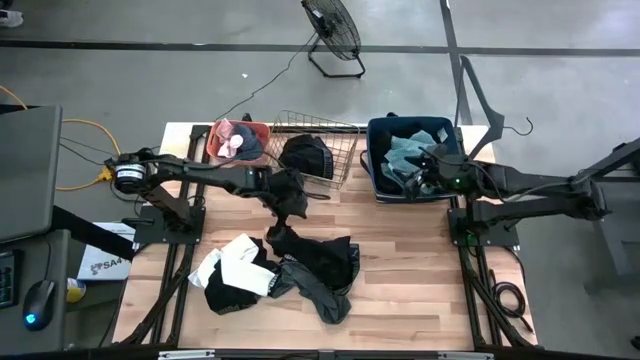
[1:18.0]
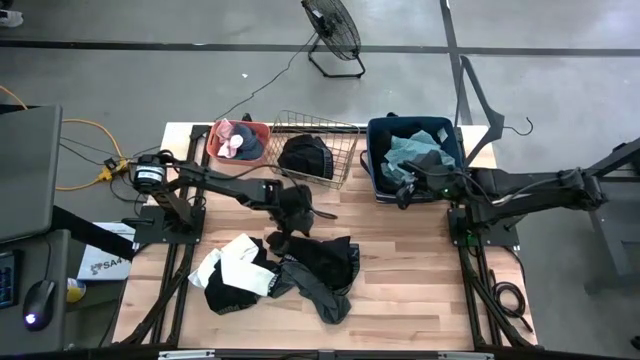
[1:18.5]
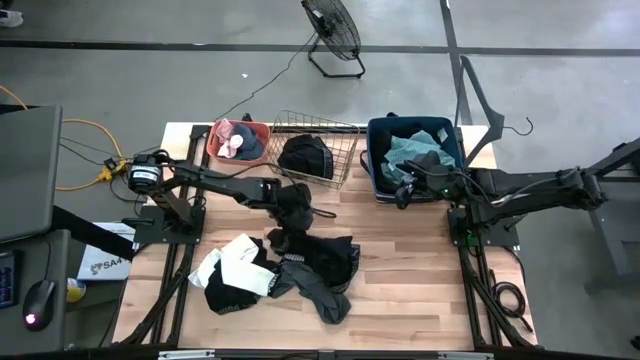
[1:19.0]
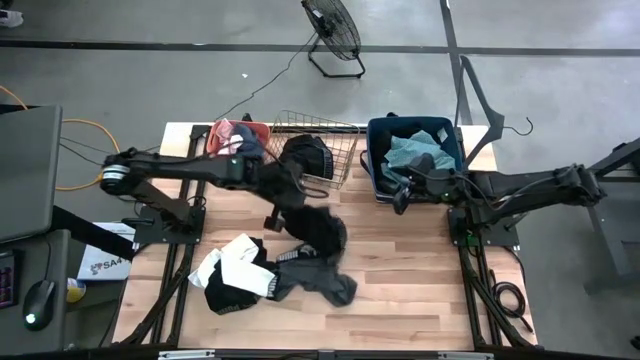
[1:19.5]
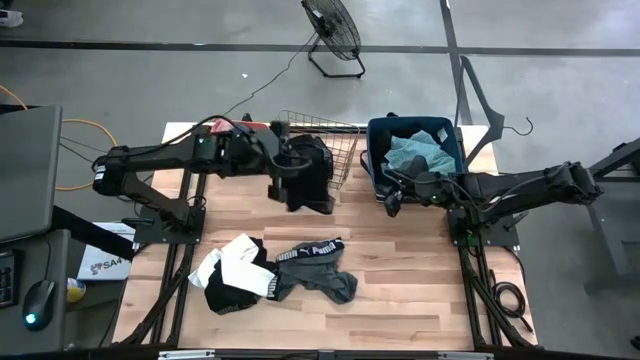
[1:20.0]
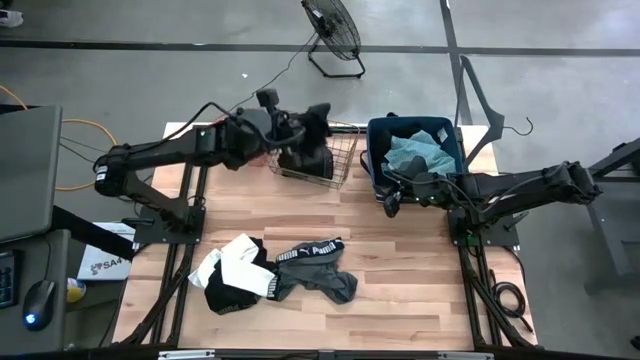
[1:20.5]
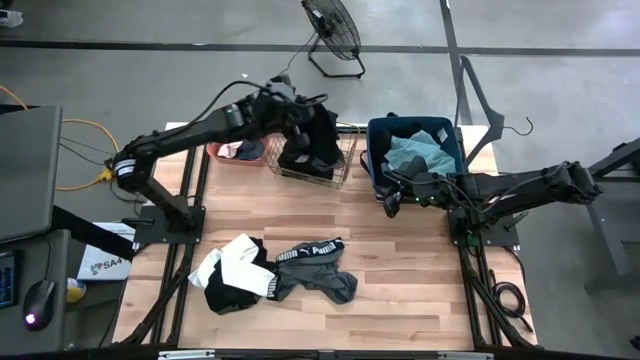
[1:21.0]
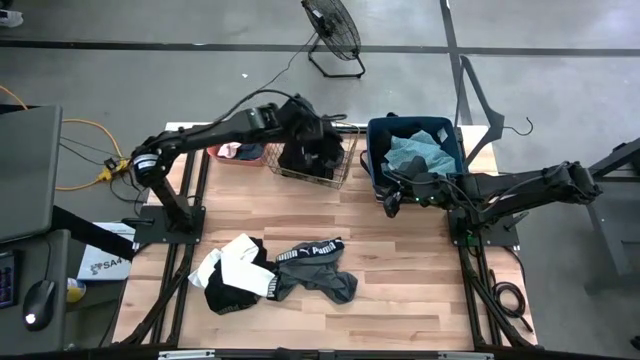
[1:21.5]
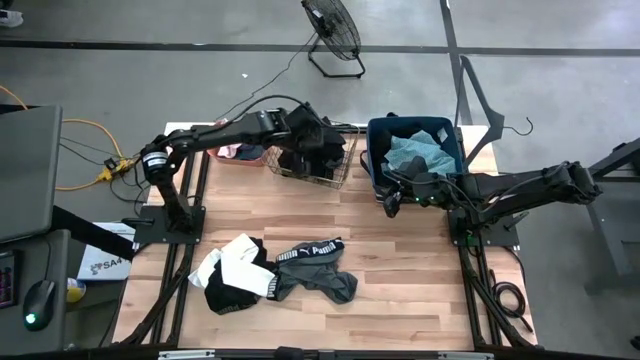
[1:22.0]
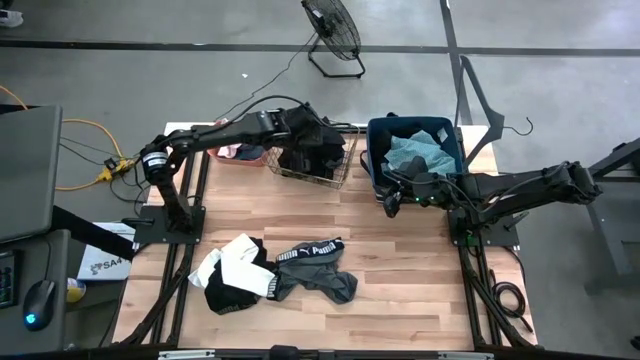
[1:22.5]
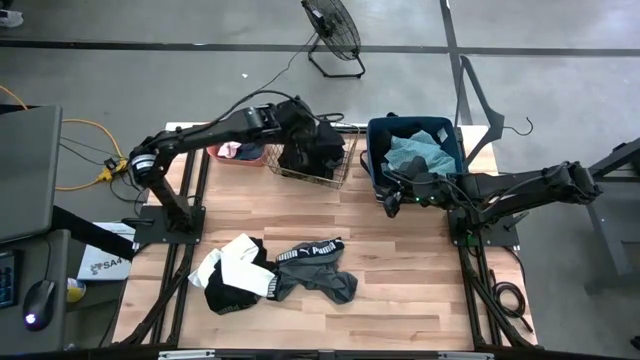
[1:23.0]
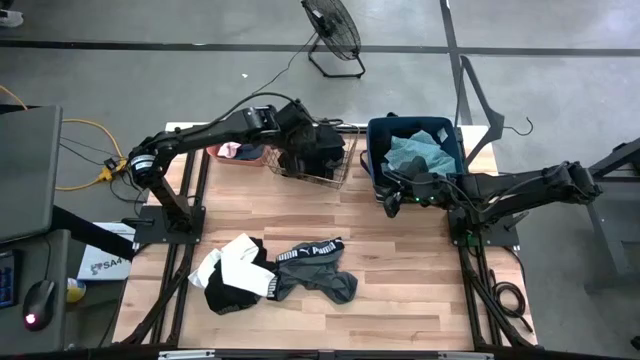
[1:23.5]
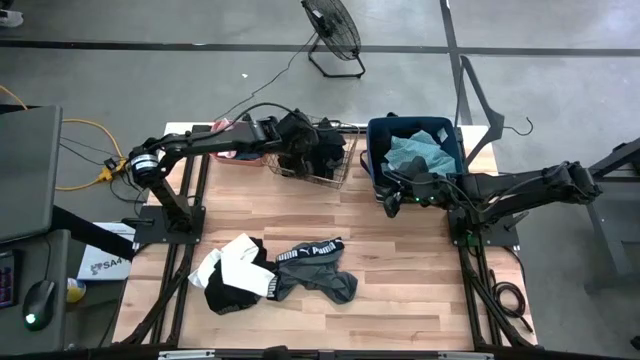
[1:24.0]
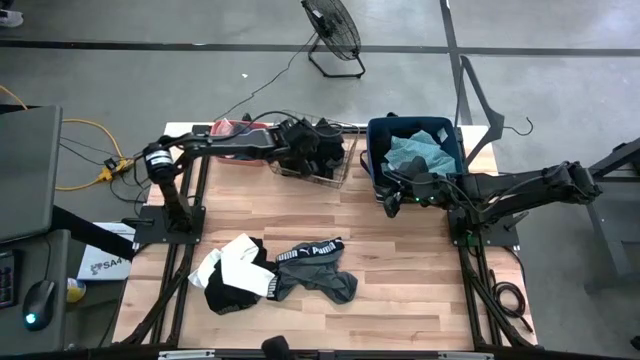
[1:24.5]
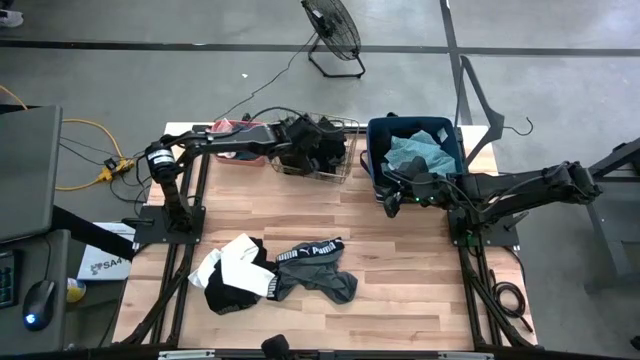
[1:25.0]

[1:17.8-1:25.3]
Task: Pick & Place Cloths
Put the right black boxer into the gold wire basket

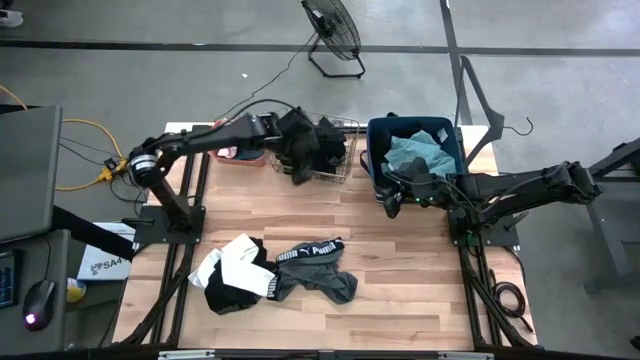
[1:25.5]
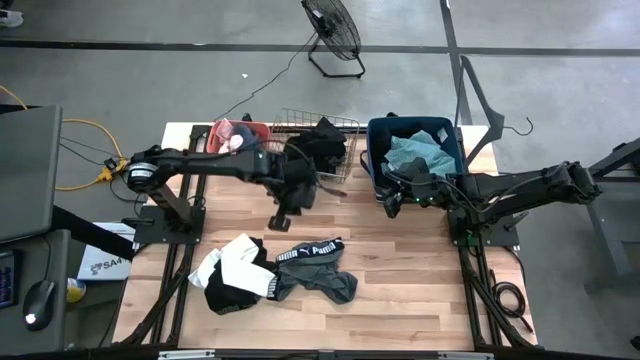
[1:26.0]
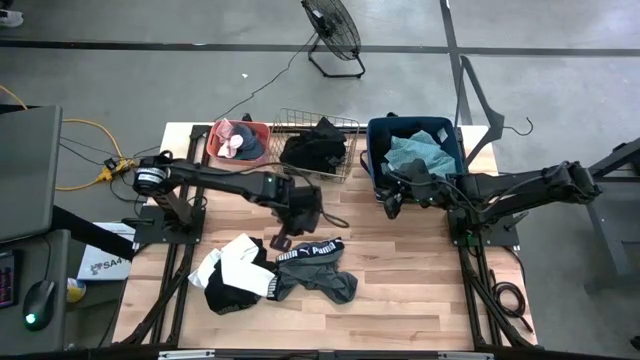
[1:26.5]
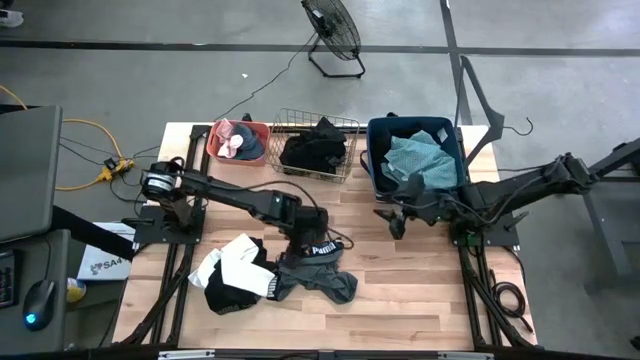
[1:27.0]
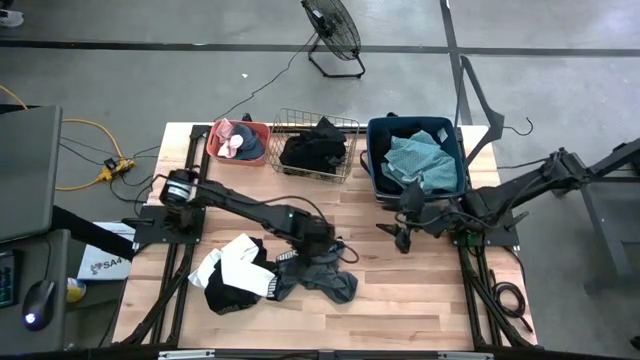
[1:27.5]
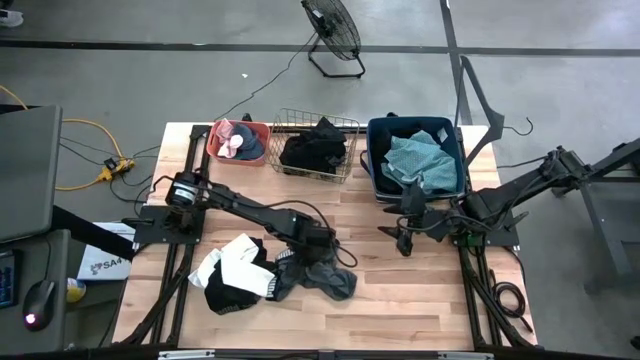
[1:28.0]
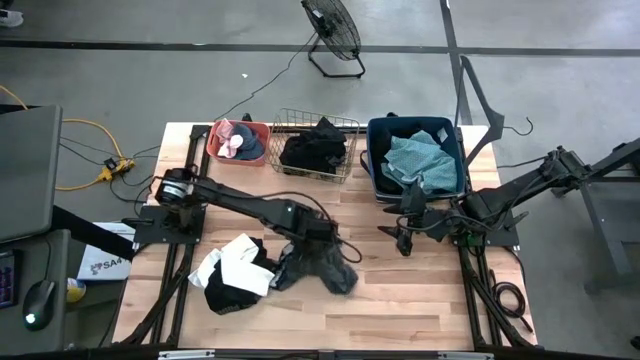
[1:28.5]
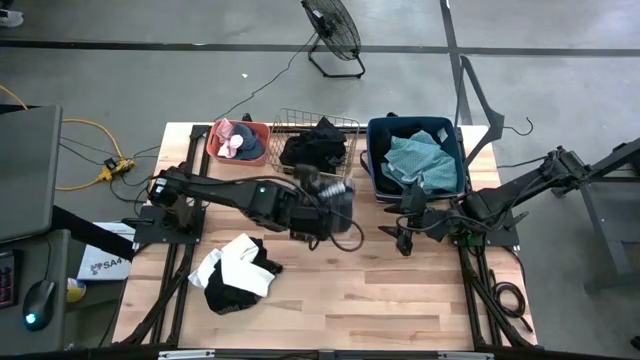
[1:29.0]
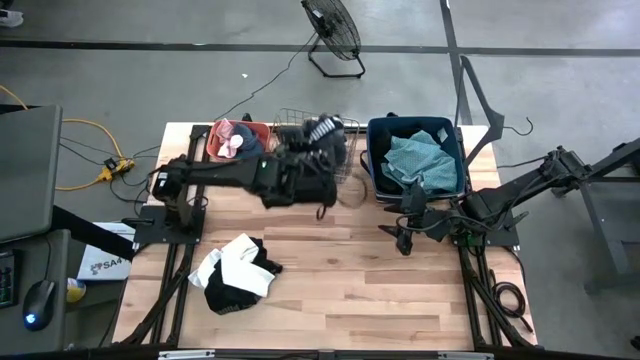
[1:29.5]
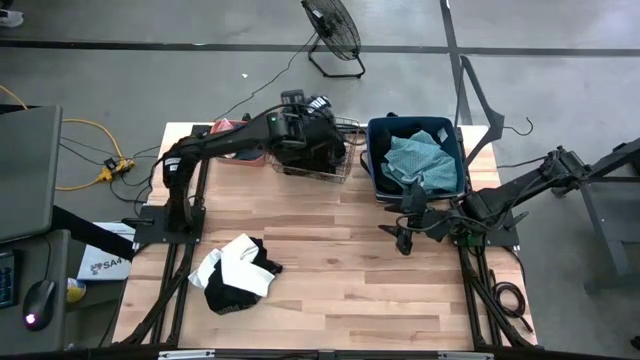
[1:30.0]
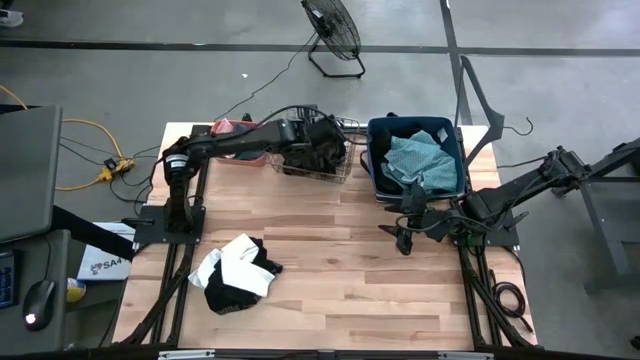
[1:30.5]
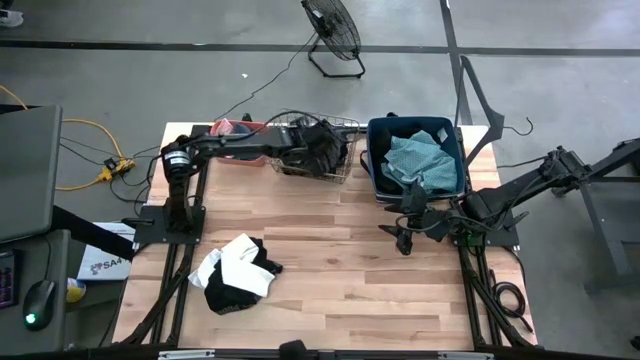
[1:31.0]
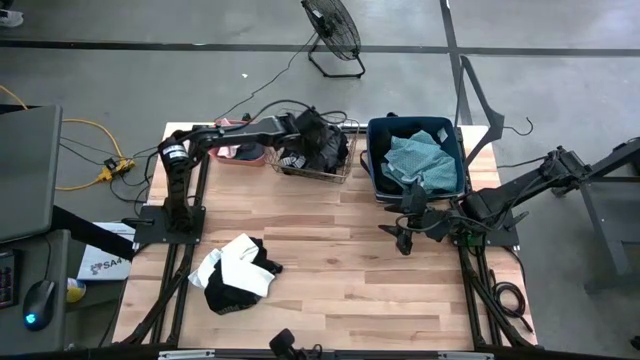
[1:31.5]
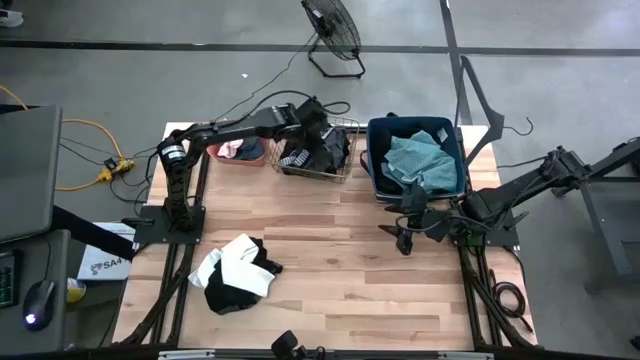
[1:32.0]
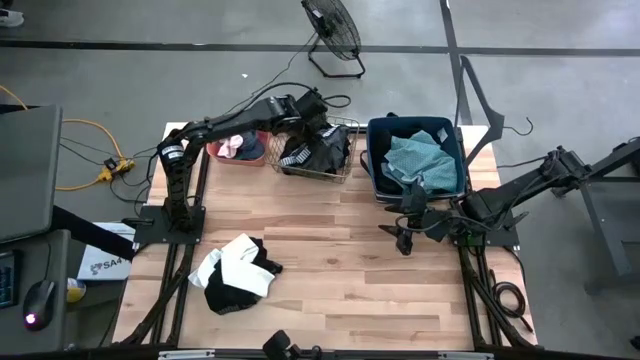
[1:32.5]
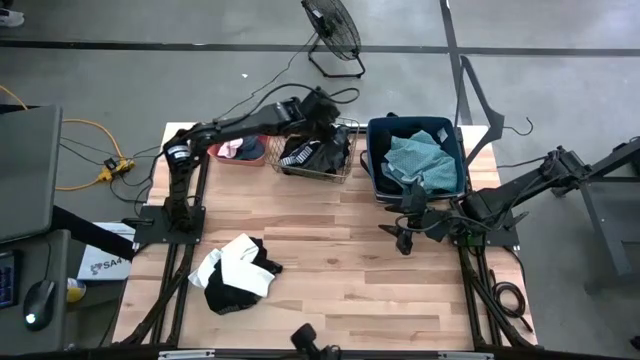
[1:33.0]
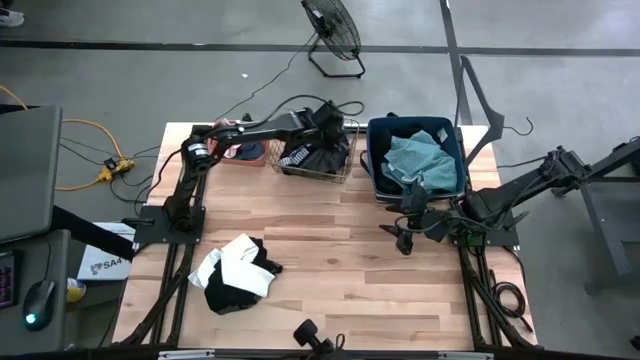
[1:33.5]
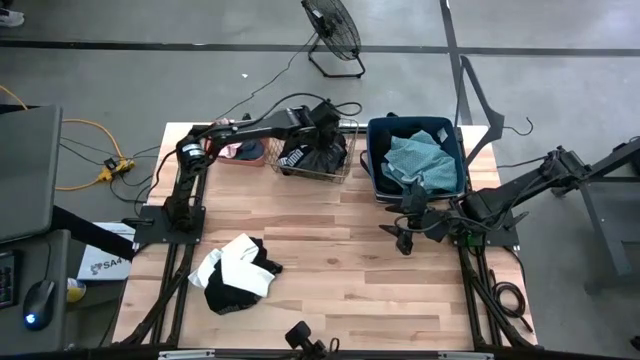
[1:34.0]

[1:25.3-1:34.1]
Put the gray boxer into the gold wire basket

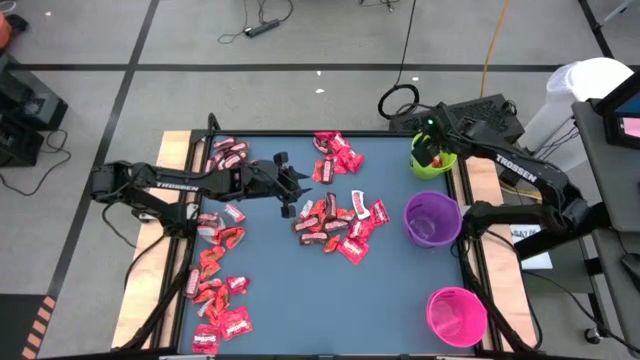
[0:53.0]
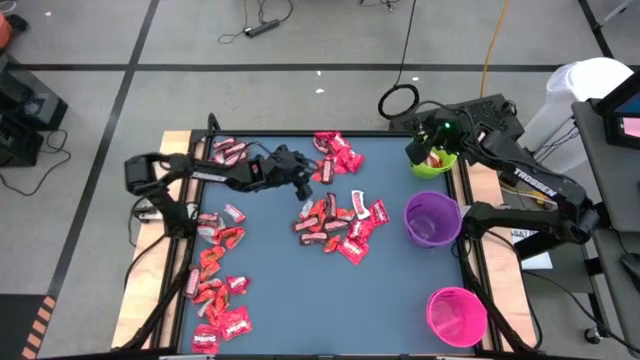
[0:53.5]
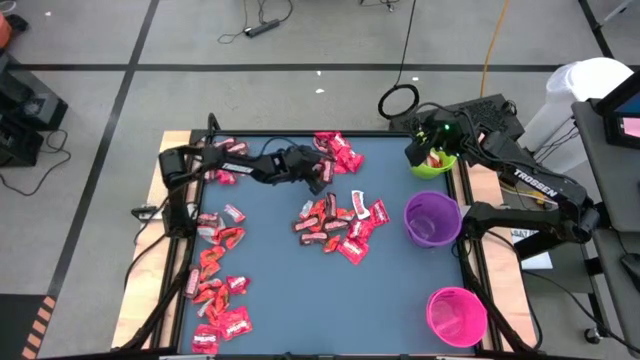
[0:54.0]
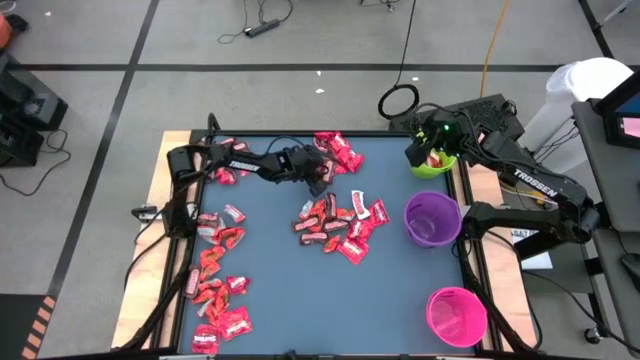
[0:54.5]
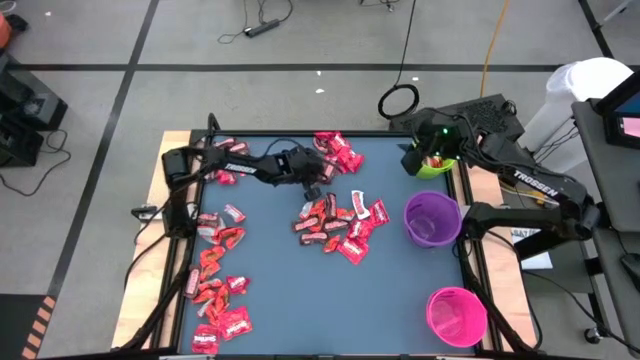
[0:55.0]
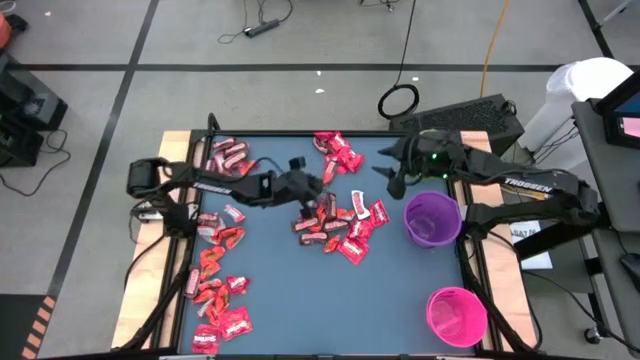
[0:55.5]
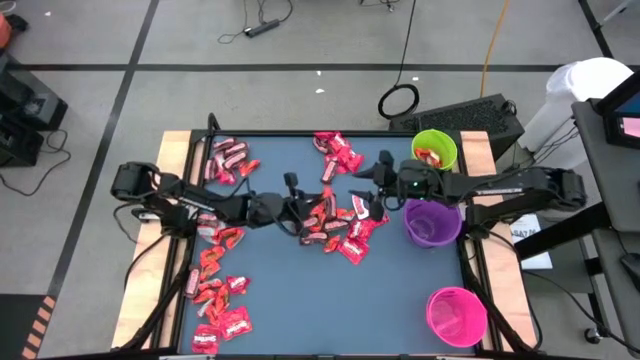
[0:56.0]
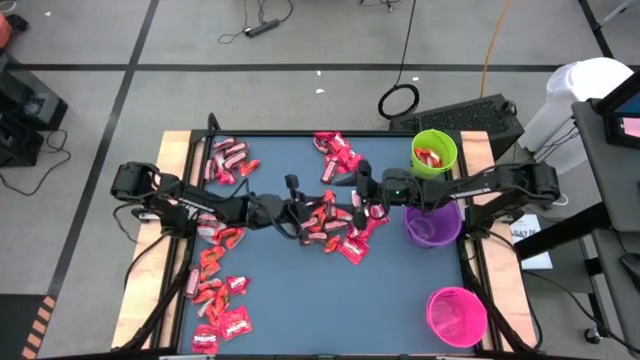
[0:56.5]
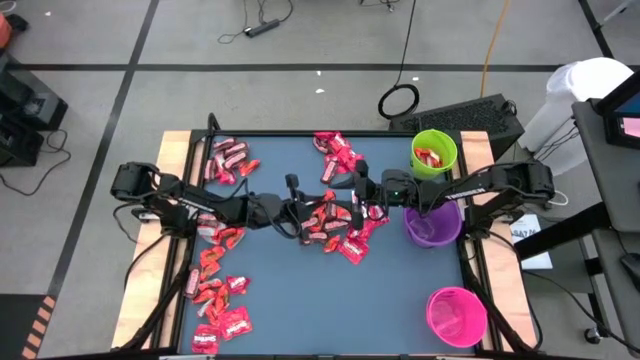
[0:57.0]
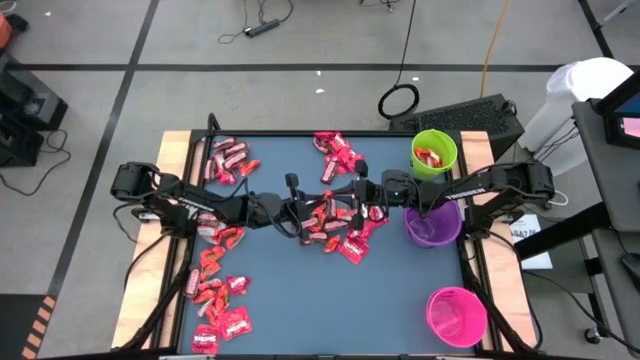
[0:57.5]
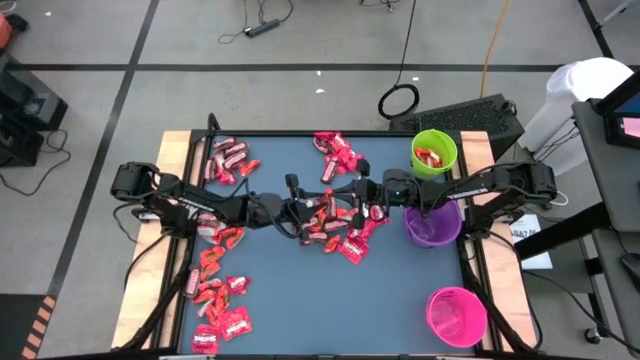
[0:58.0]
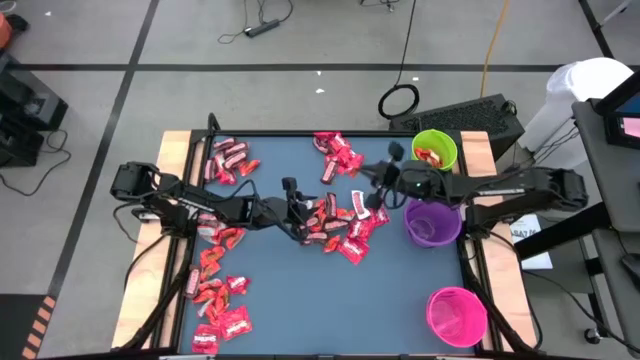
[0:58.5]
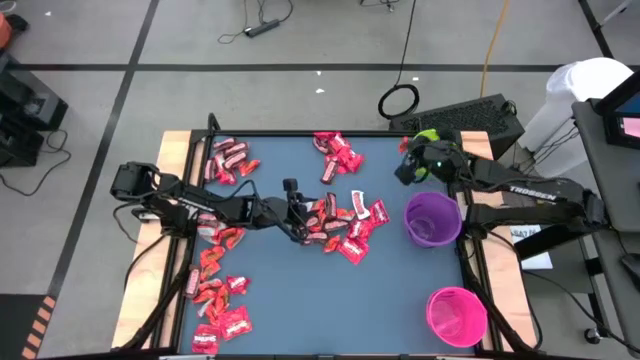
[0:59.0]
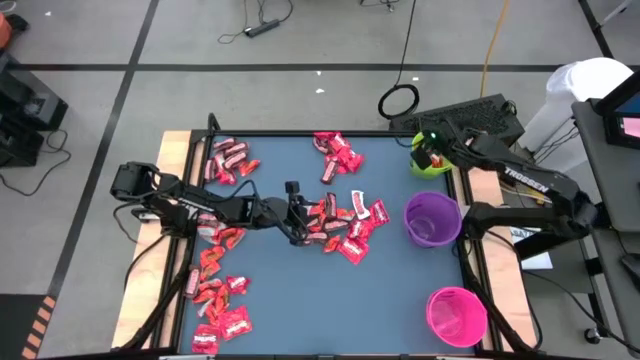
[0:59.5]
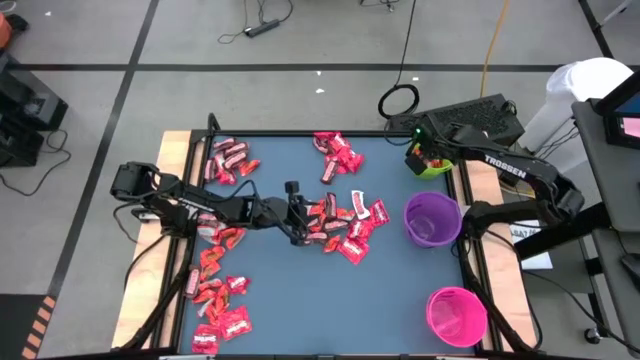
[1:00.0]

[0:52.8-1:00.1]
Task: Organize candy in baskets
Put the orange chocolate bar into the green bucket
